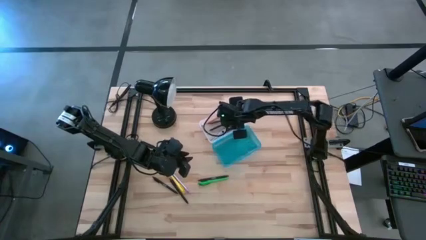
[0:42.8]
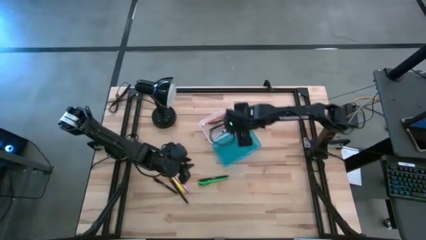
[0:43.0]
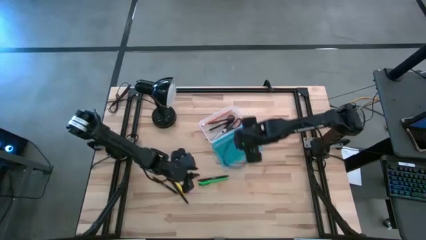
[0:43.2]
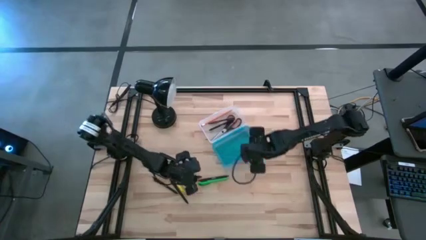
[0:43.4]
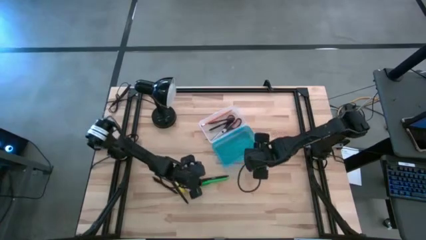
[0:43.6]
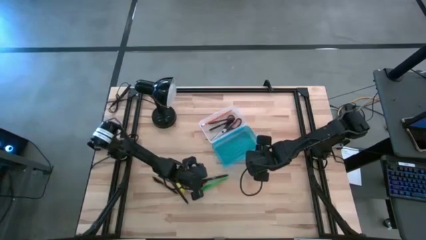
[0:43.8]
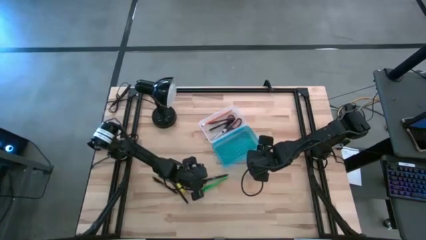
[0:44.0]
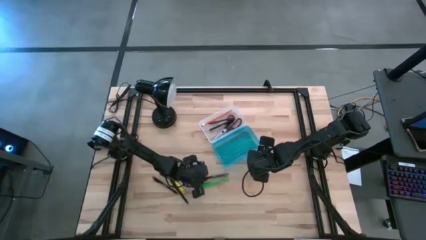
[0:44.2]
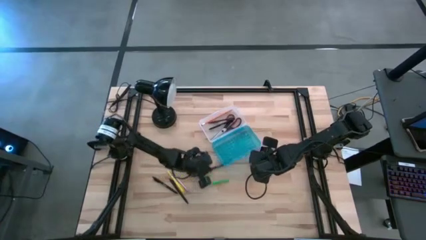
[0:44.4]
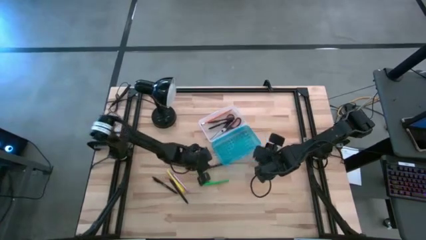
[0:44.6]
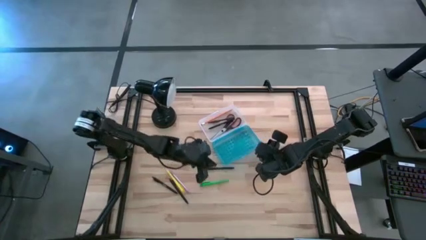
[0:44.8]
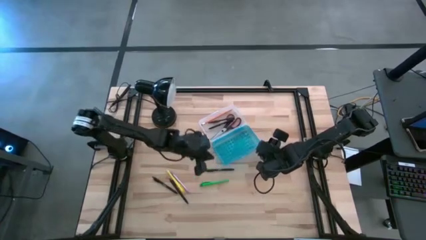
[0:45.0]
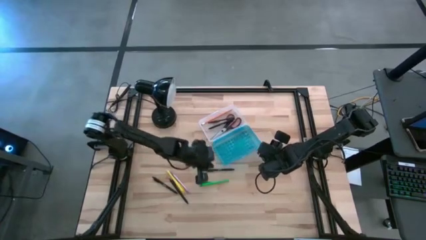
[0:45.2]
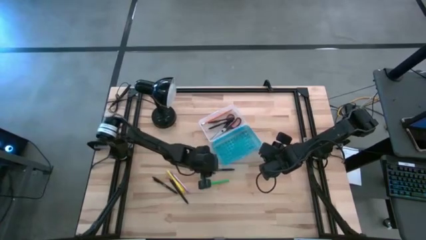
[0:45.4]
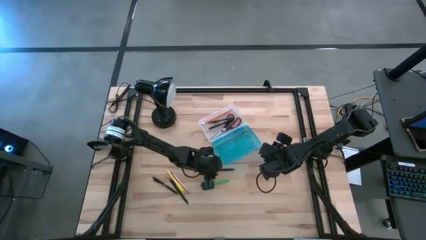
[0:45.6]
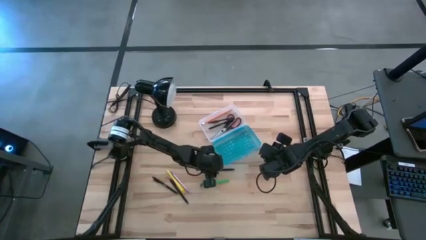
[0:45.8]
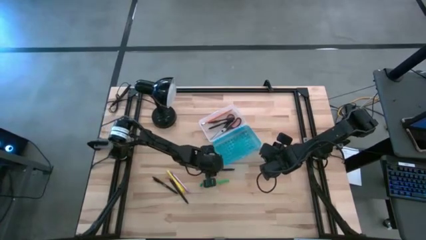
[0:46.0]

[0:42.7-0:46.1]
Task: Pick & place school supplies into a supply box
Put the right black pen into the supply box

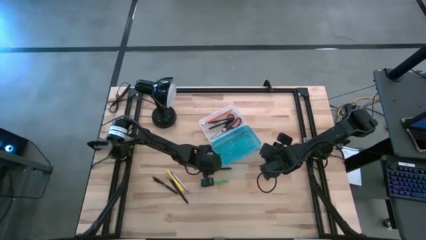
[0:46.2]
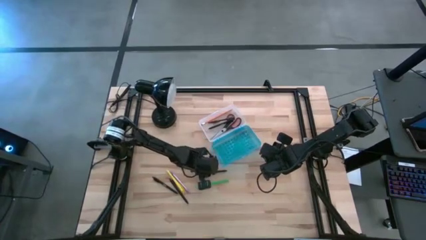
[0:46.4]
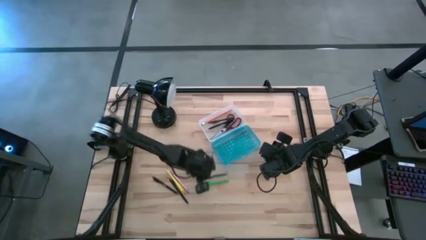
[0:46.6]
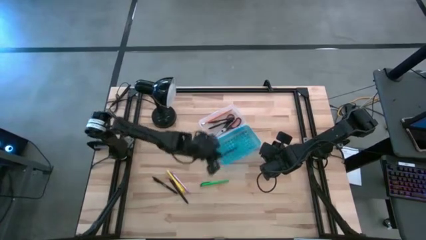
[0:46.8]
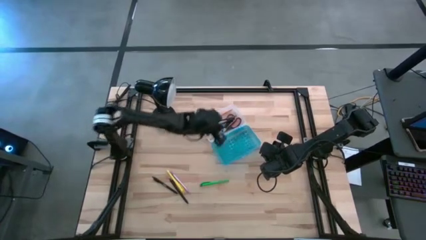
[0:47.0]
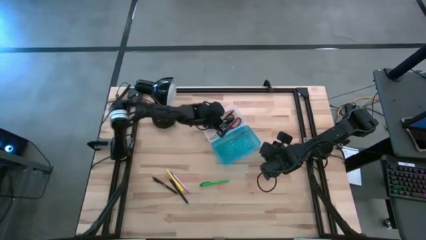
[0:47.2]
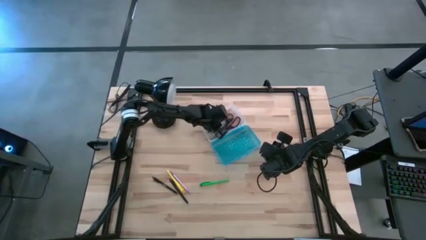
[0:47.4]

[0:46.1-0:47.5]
Put the right black pen into the supply box

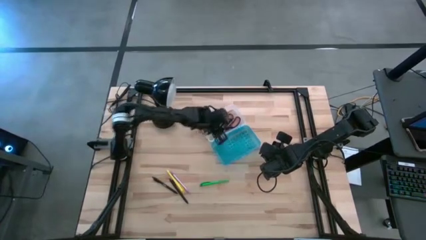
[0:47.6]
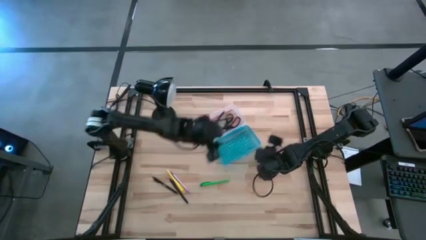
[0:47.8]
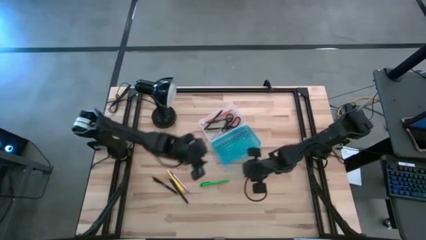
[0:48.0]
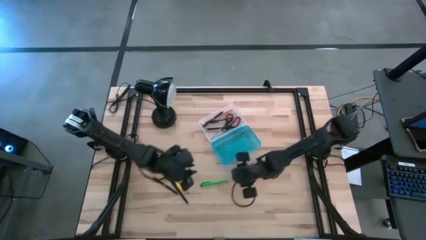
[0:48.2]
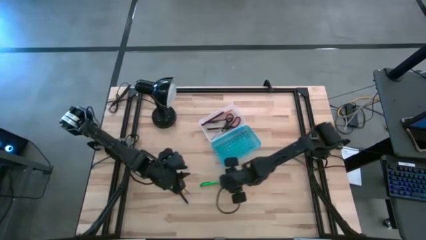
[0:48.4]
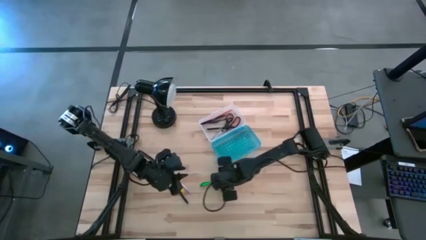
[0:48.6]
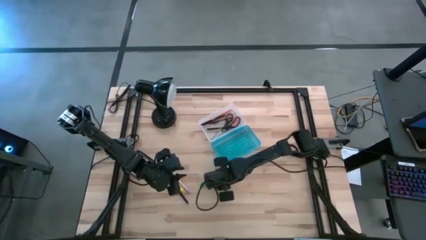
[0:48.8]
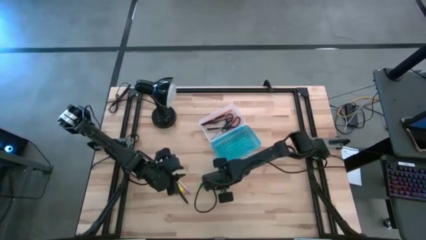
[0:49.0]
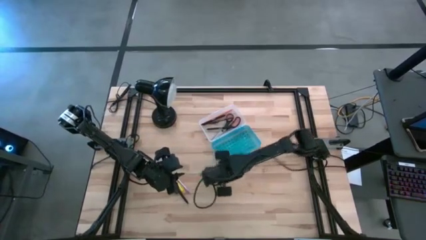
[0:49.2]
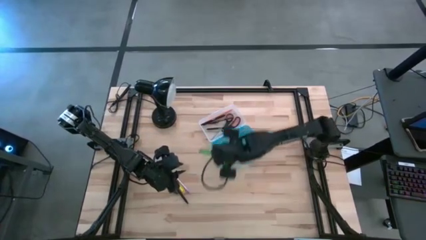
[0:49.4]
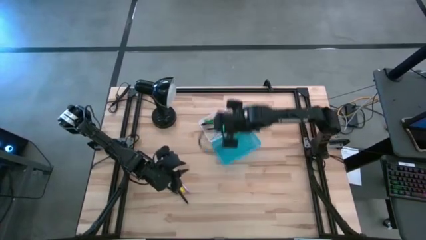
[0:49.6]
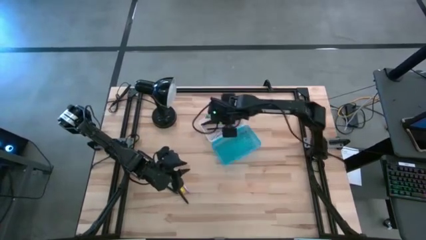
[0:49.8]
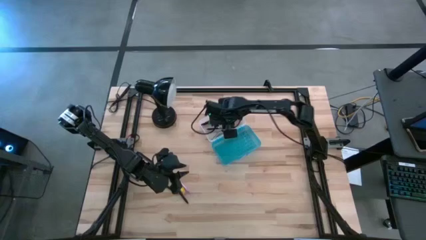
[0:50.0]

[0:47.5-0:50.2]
Put the green pen into the supply box

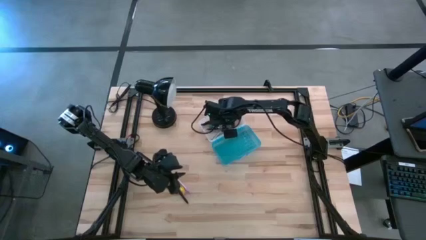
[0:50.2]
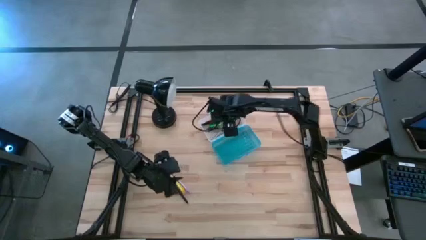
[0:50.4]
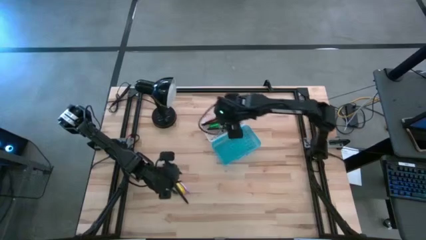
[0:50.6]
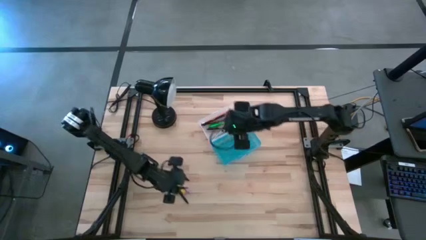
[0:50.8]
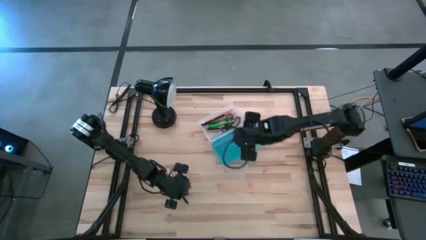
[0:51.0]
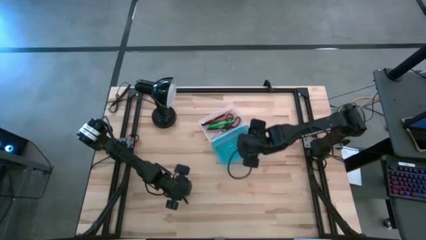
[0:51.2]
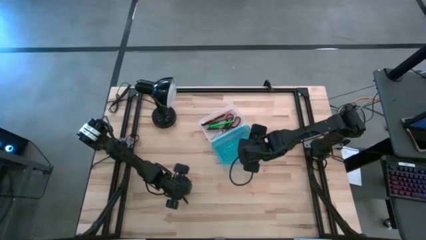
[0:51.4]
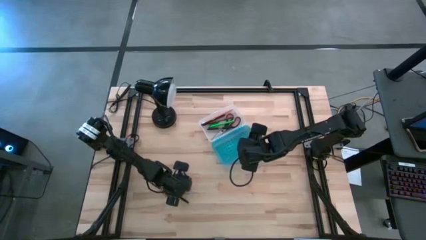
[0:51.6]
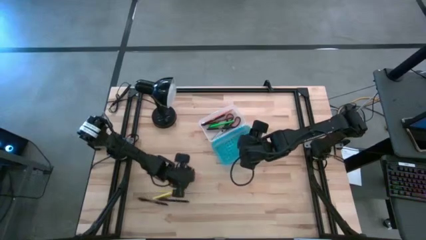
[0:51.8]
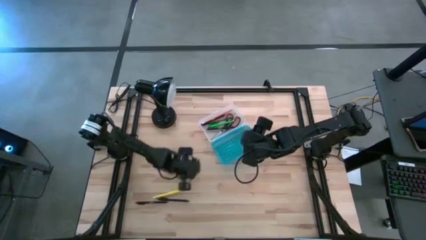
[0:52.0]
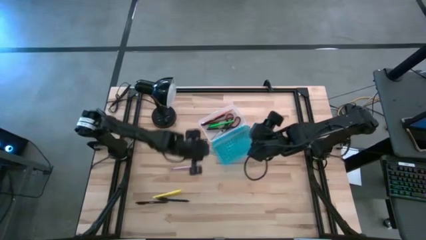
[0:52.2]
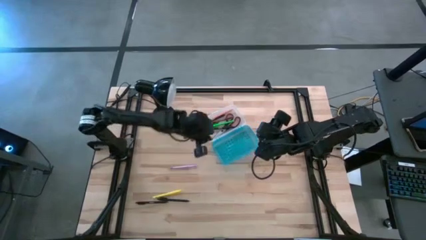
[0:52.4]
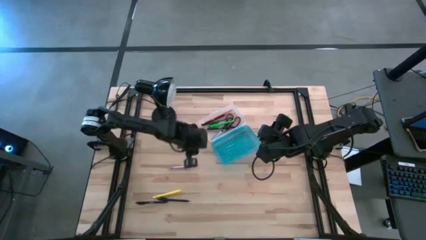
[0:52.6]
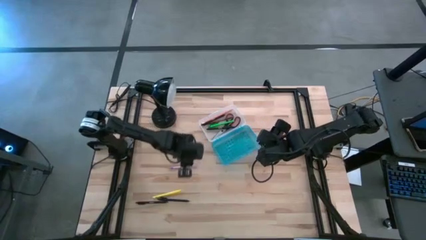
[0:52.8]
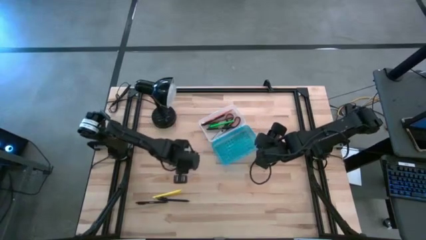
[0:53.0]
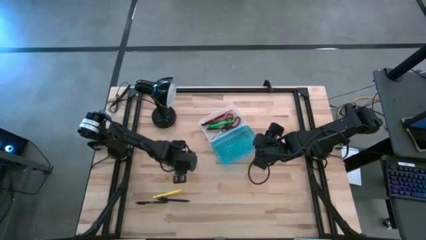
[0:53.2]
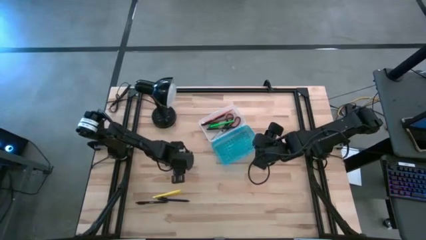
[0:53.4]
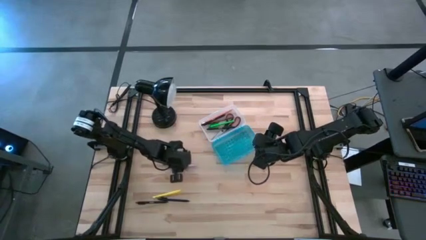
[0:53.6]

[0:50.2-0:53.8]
Put the purple pen into the supply box

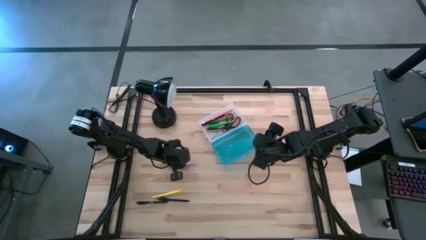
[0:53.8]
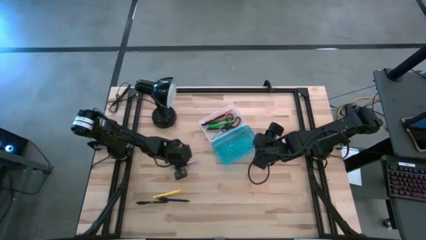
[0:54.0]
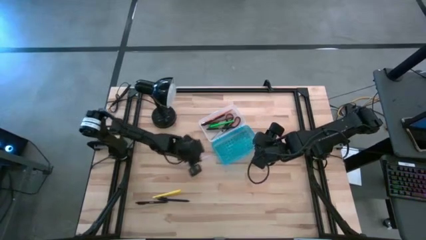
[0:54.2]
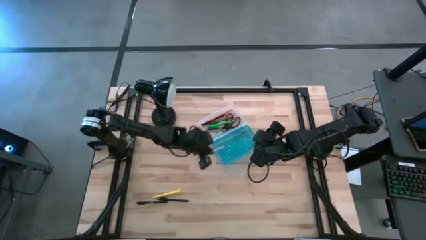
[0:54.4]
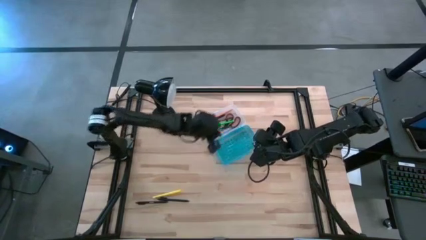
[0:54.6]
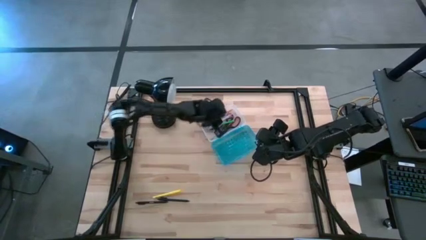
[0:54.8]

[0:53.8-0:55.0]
Put the purple pen into the supply box

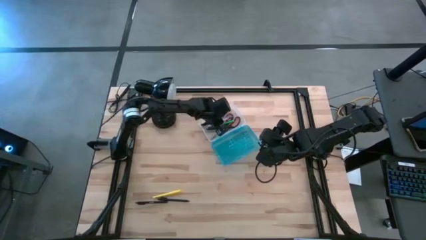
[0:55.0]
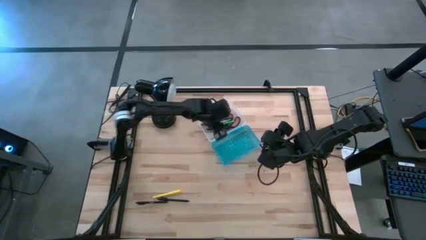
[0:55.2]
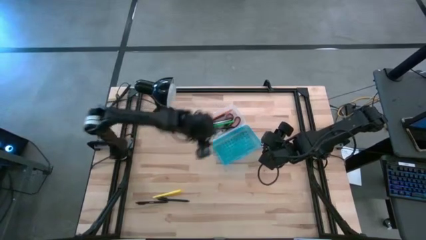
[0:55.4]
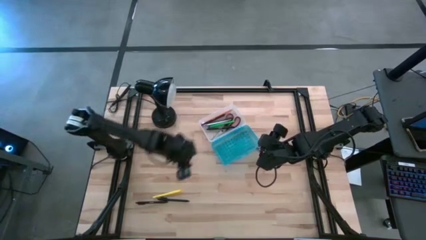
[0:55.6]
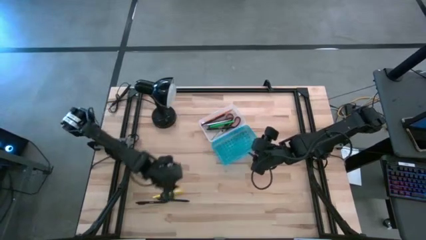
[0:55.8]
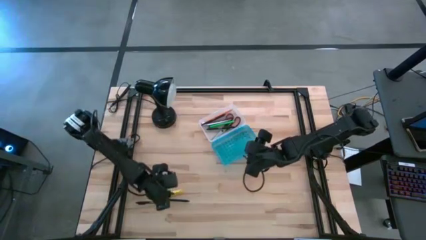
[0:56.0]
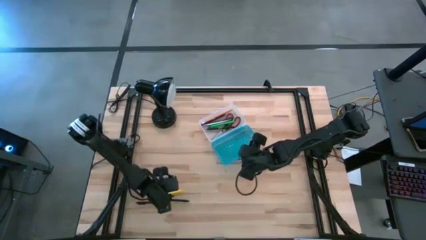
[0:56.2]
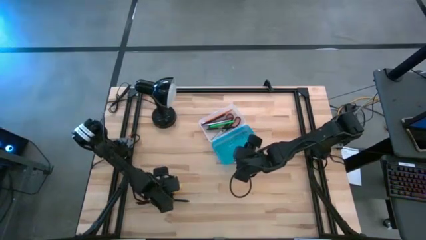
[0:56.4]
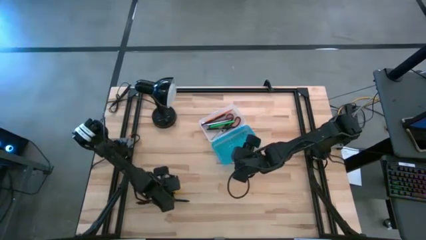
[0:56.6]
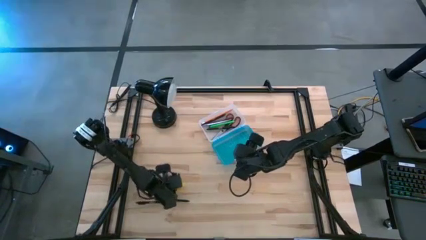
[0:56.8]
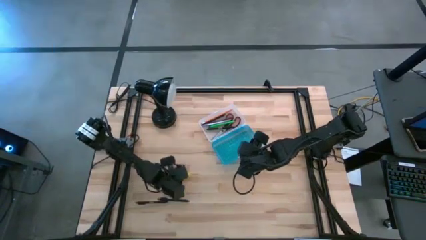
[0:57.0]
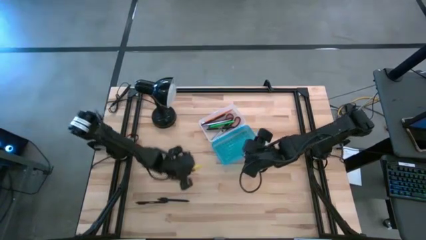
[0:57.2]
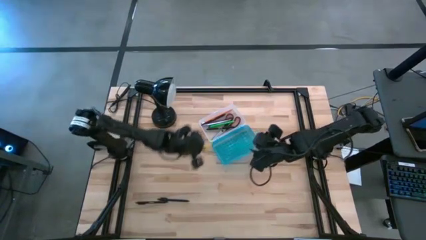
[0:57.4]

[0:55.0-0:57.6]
Put the yellow pen into the supply box

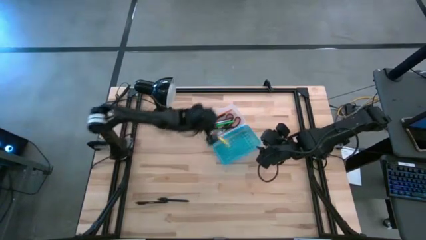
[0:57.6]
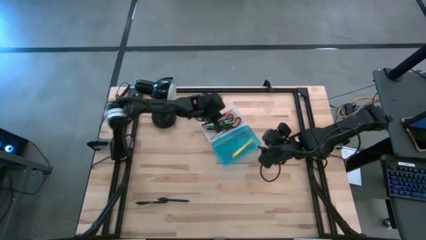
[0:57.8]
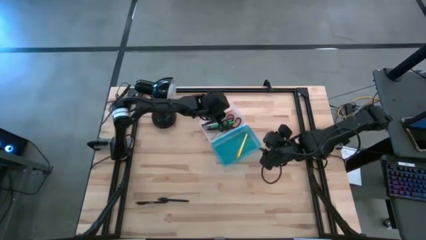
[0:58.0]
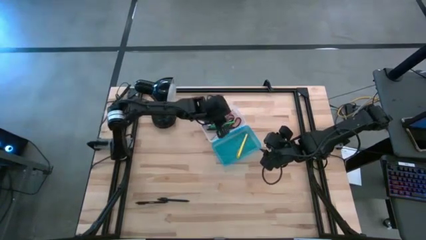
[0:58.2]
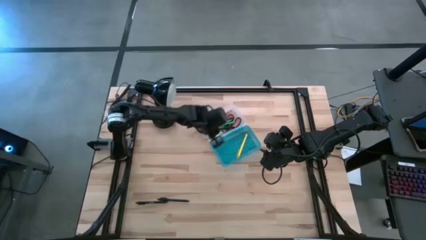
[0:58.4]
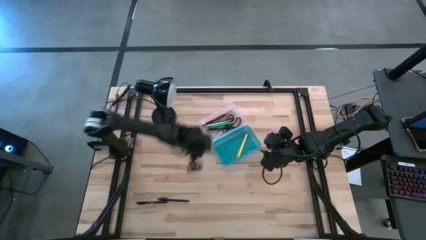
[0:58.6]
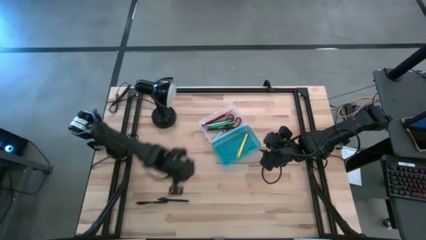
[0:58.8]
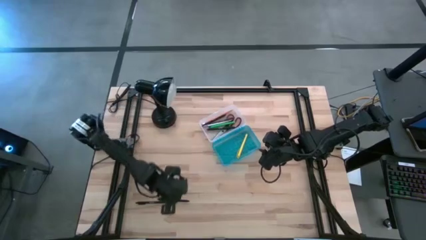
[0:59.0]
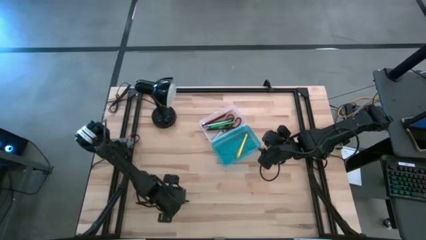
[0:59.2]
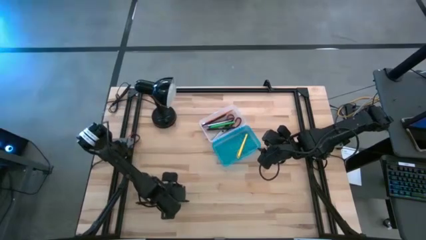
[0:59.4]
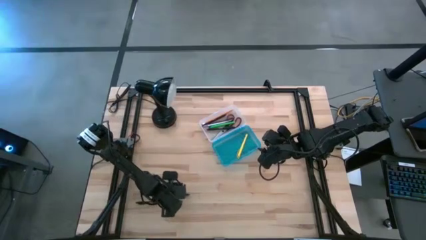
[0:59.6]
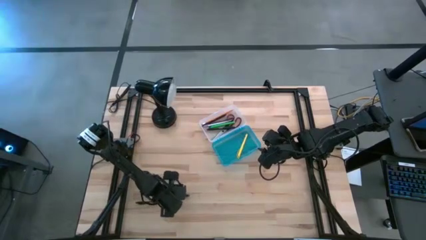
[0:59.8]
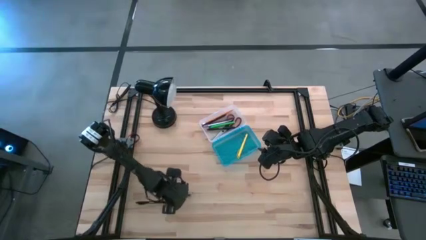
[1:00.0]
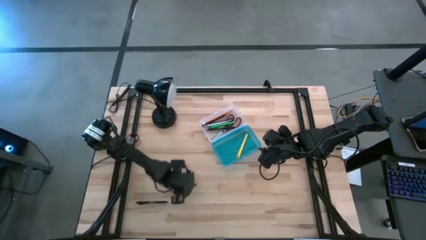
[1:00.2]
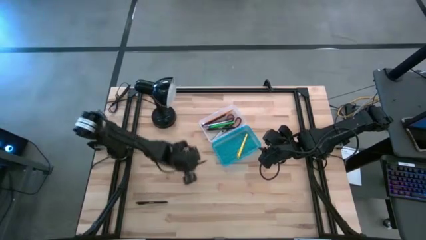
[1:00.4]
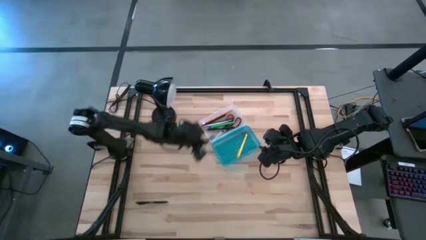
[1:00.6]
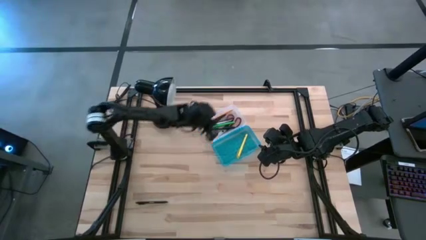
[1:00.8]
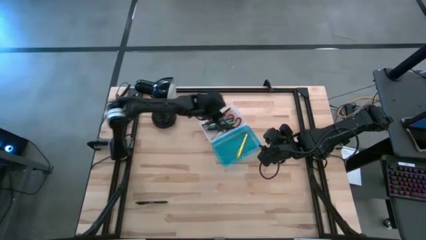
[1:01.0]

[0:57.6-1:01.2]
Put the right black pen into the supply box
